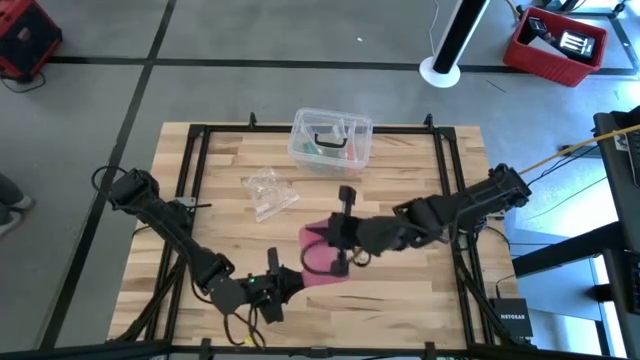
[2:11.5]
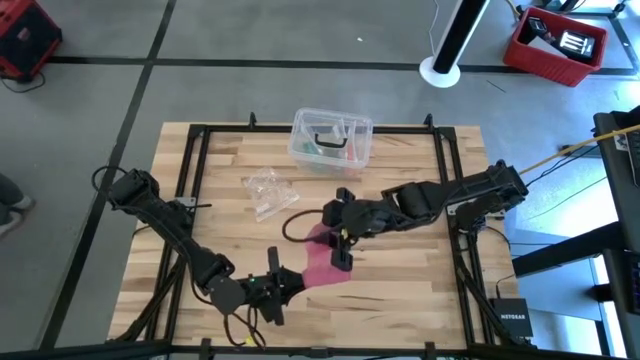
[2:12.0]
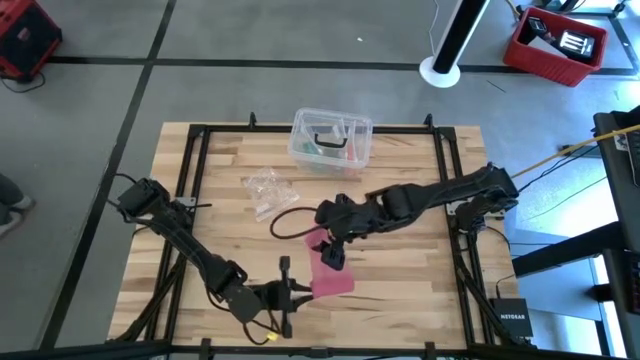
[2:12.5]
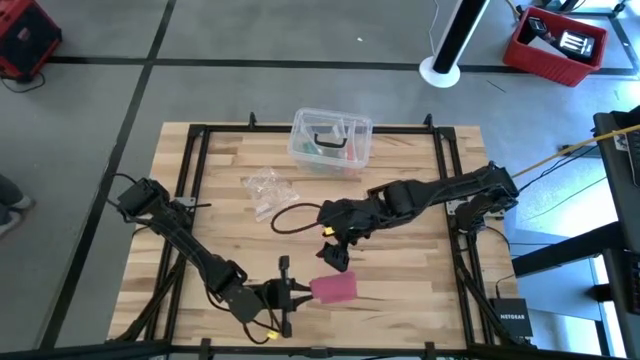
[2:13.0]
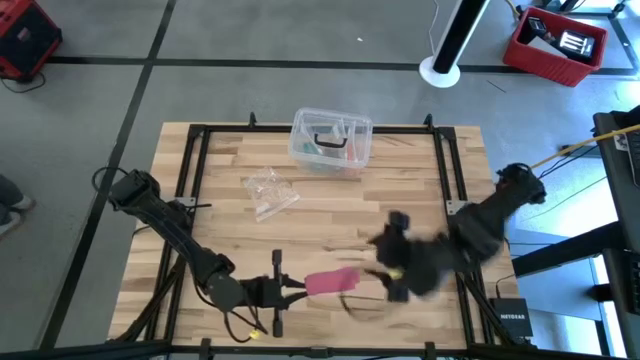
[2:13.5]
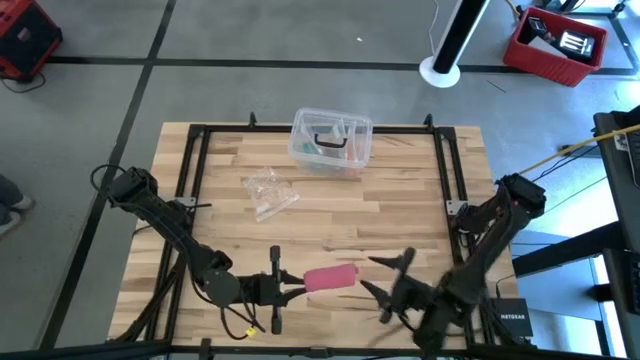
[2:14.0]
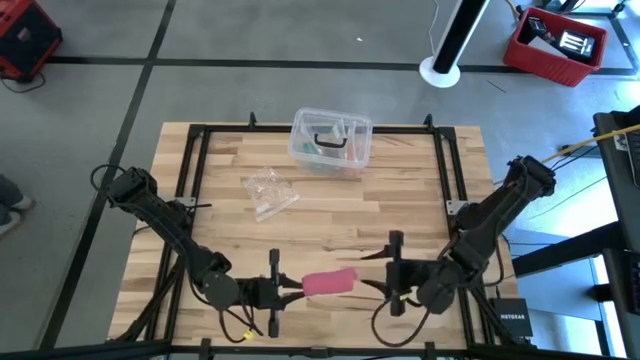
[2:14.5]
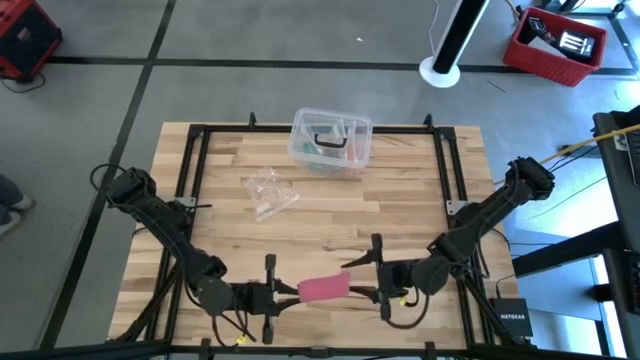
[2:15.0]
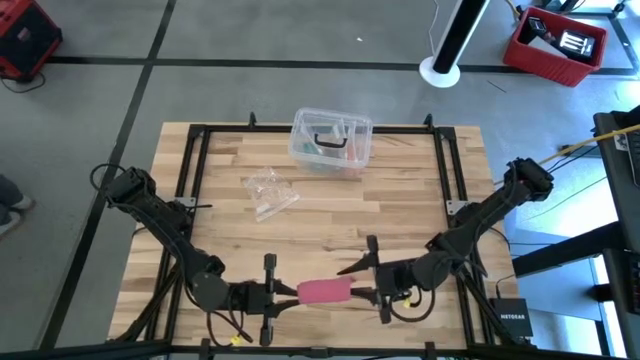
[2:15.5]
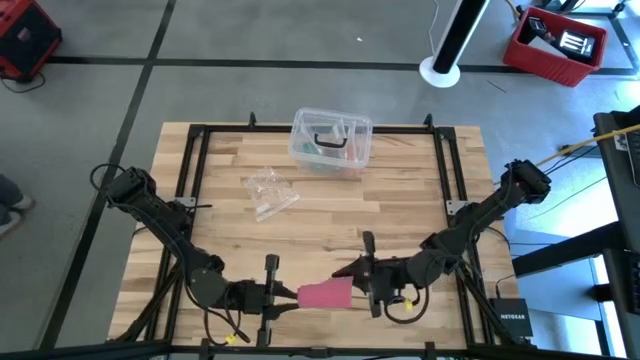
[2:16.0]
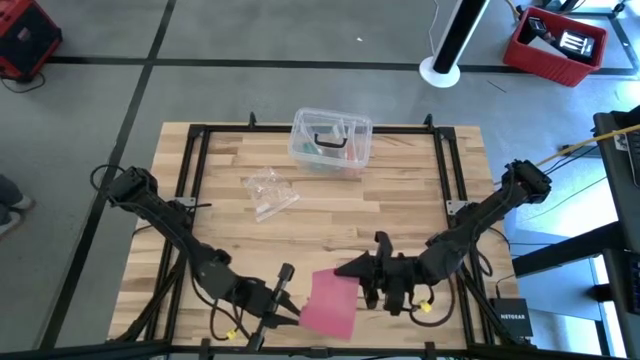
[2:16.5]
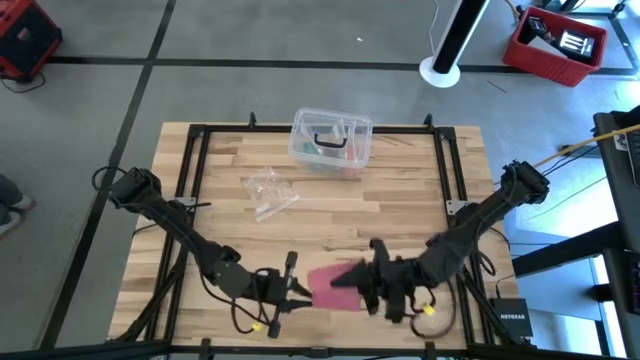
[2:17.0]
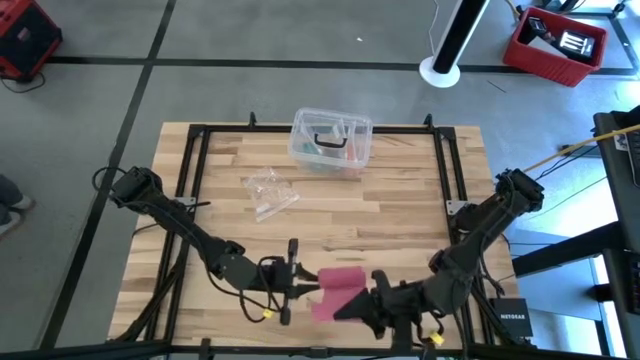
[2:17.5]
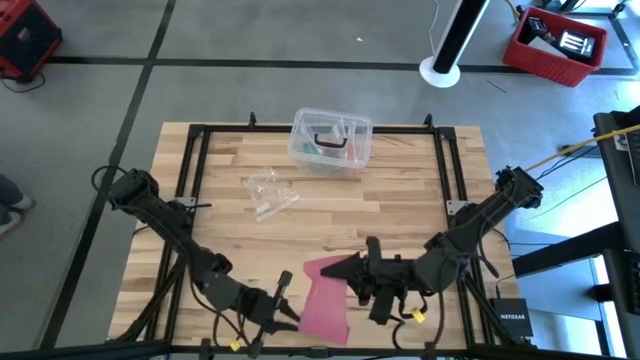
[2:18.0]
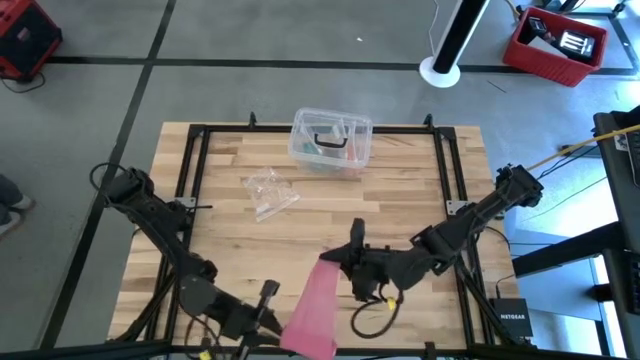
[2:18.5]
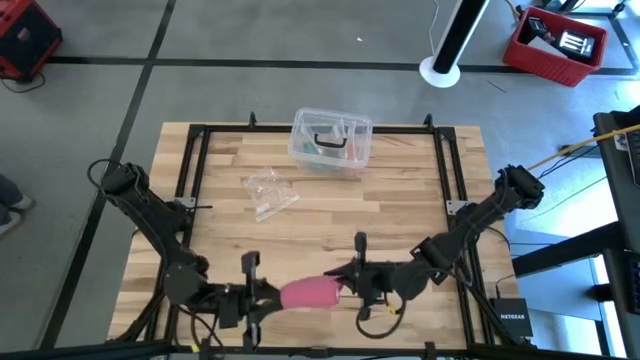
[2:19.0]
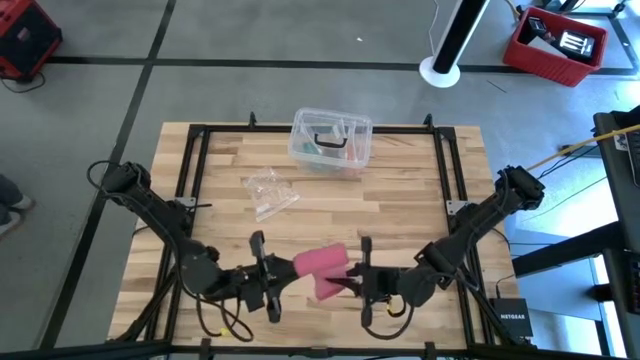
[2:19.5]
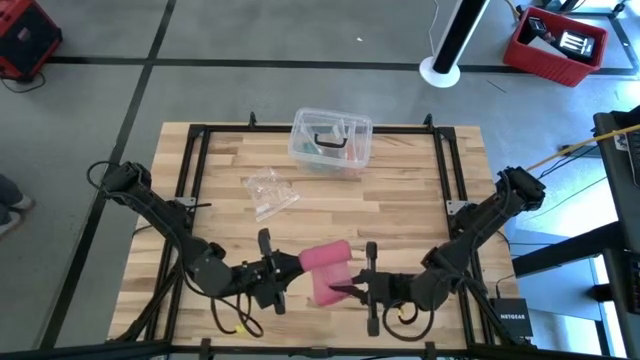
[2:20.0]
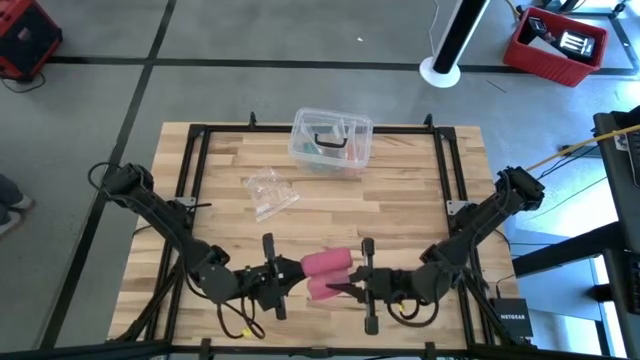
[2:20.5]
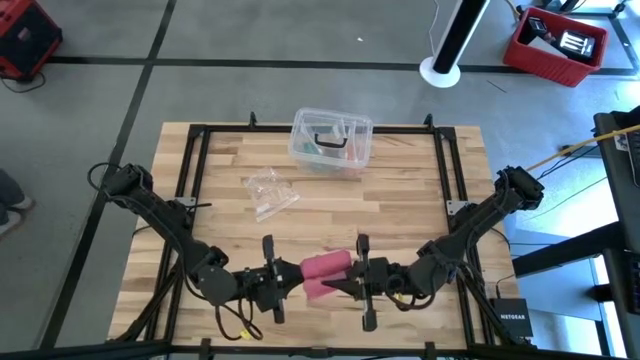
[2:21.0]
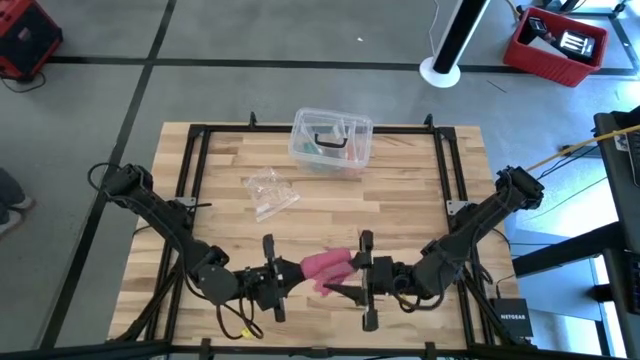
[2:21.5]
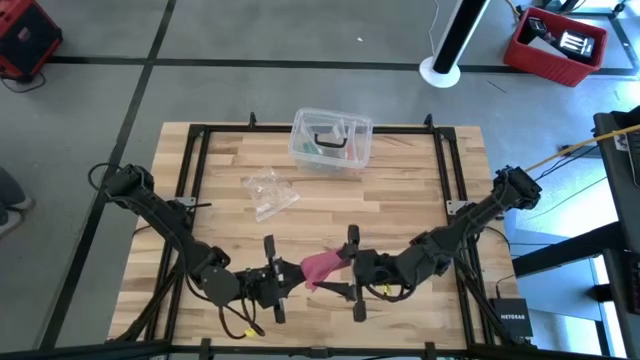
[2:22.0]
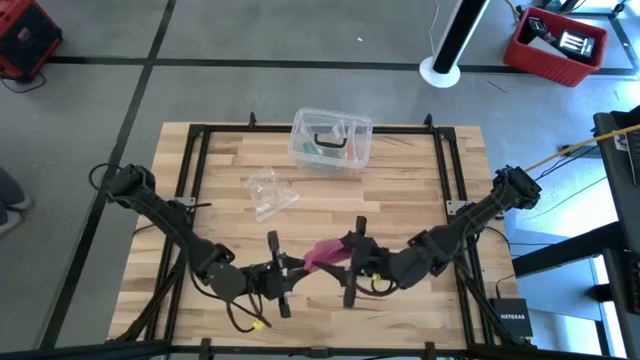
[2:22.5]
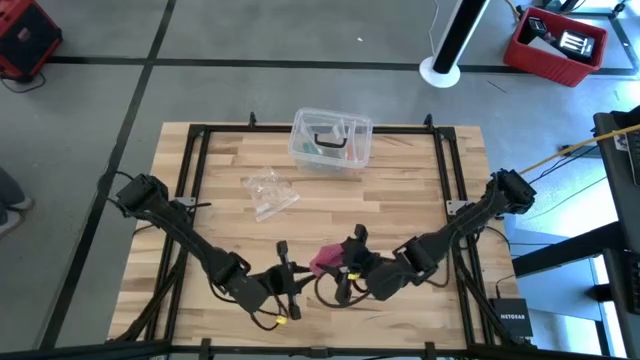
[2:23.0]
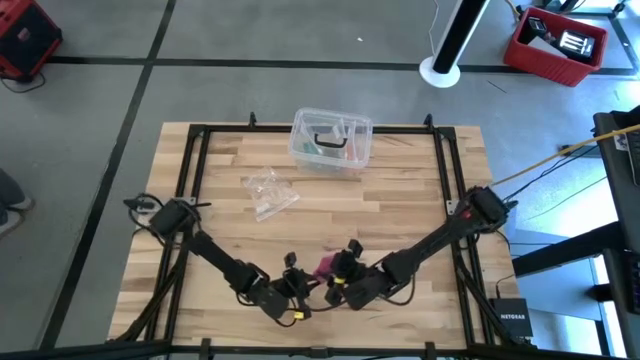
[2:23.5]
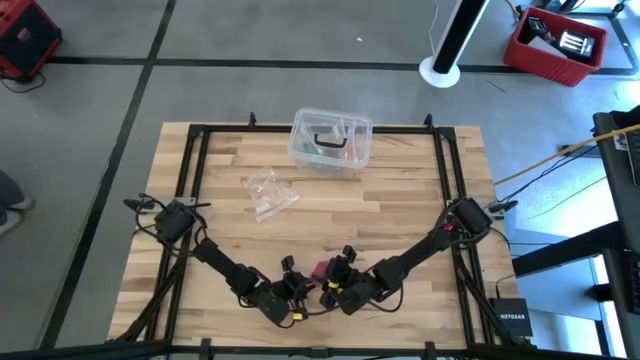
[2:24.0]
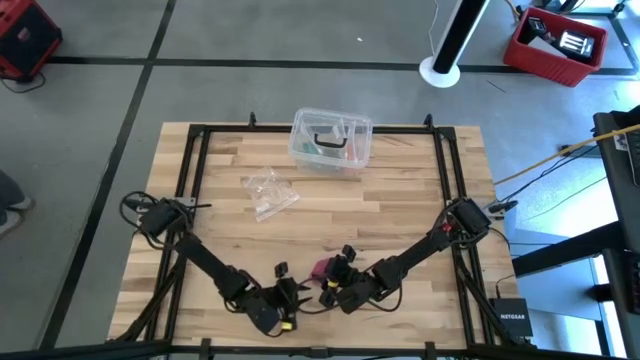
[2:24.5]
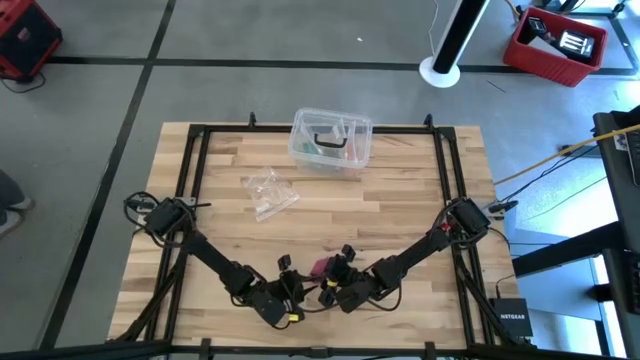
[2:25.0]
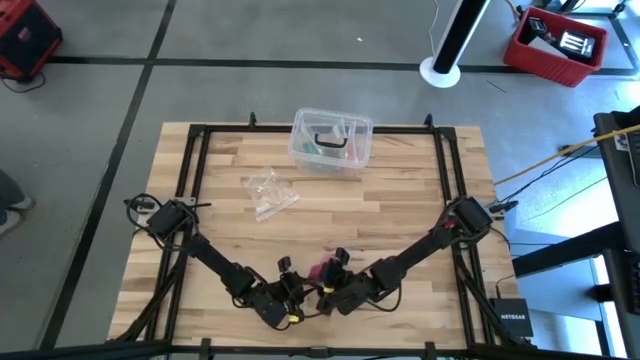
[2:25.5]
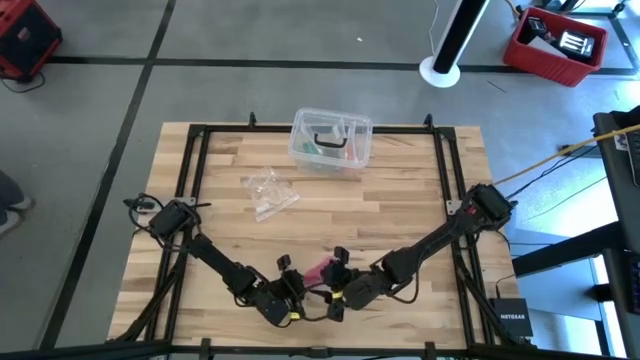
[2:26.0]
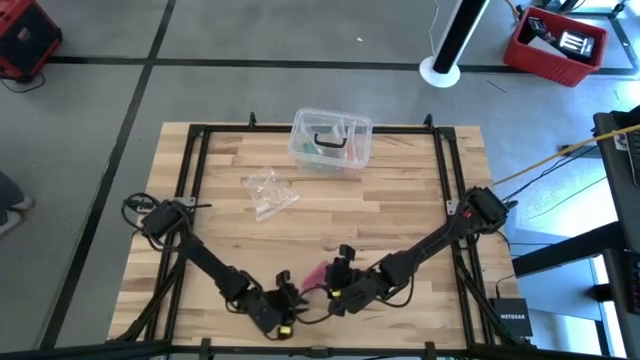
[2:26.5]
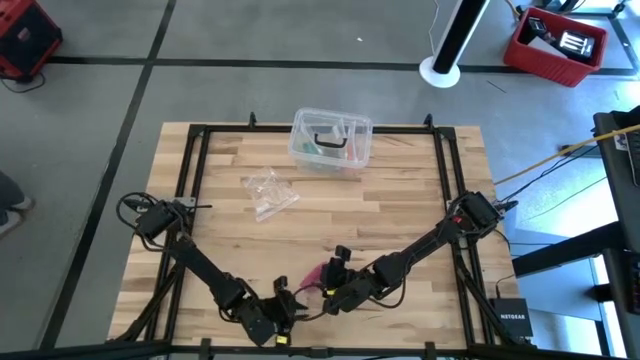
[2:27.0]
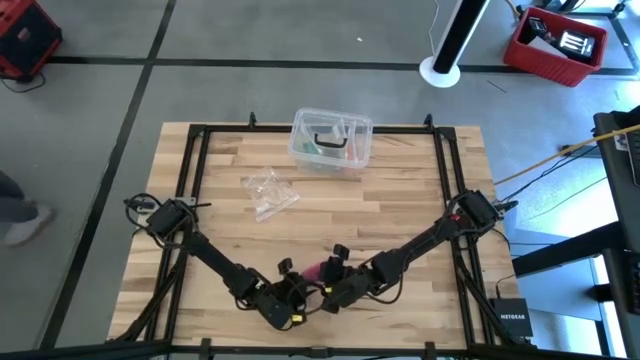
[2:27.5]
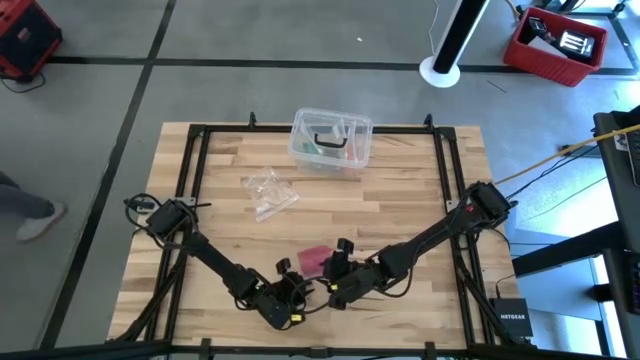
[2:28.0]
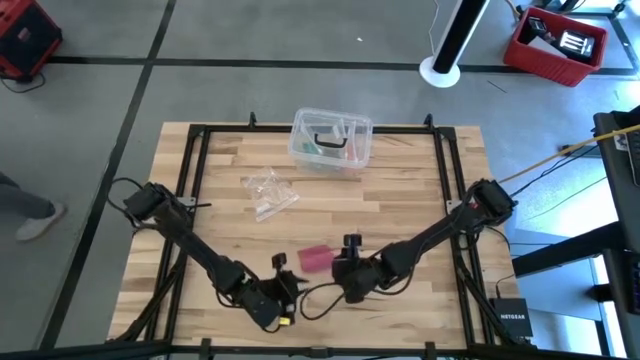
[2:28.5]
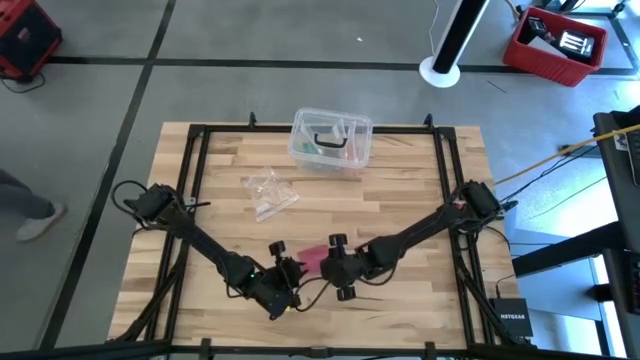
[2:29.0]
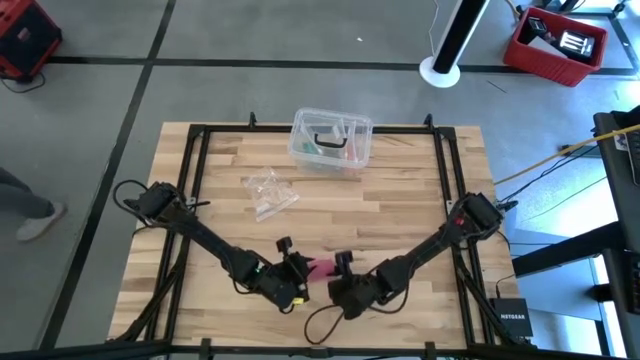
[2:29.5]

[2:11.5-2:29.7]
Task: Roll bandage
Roll the pink bandage

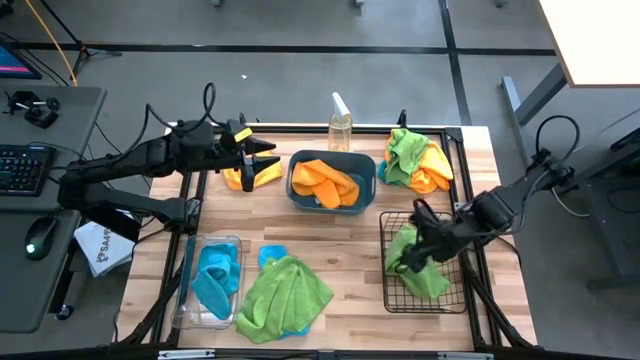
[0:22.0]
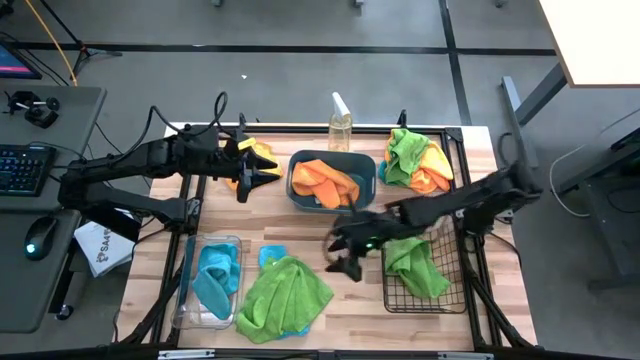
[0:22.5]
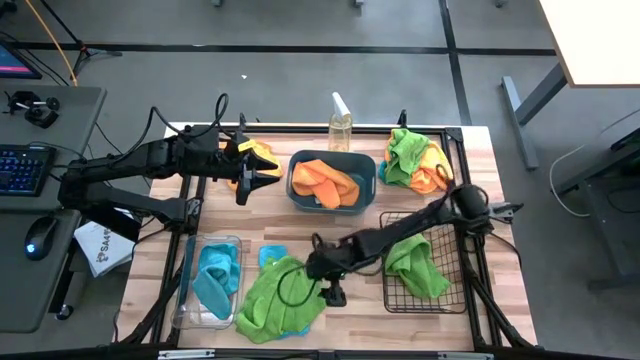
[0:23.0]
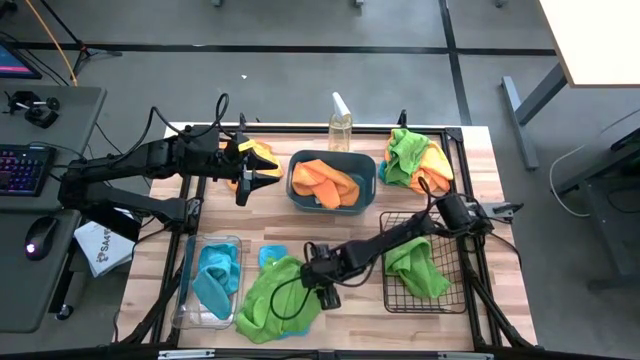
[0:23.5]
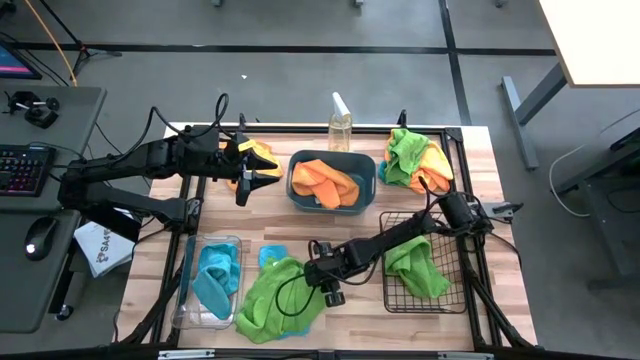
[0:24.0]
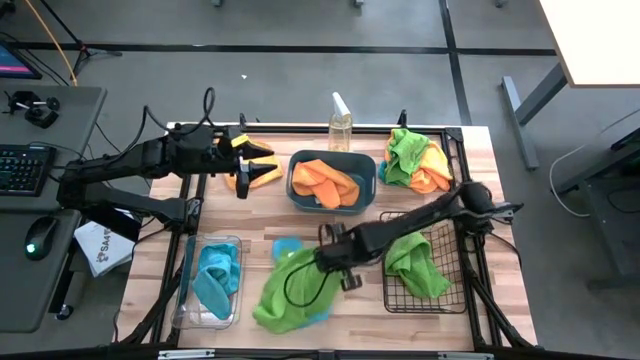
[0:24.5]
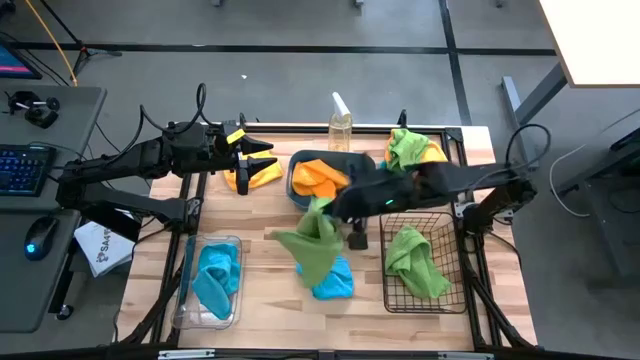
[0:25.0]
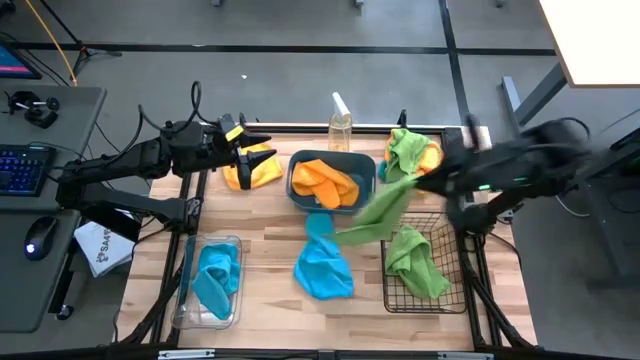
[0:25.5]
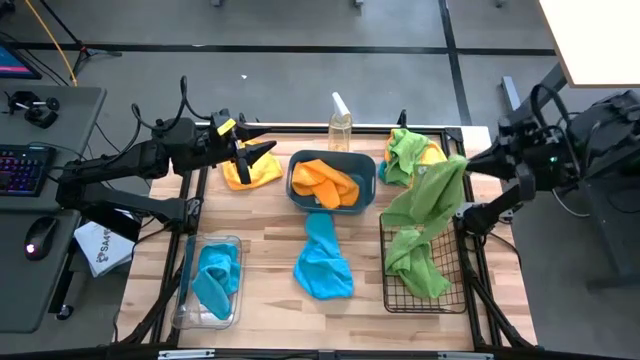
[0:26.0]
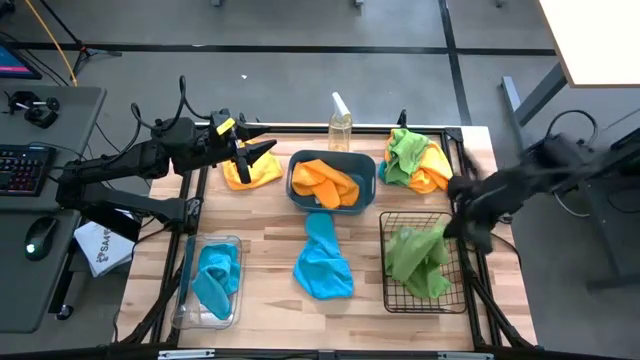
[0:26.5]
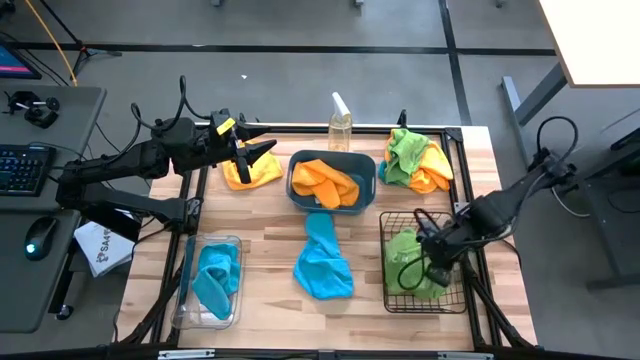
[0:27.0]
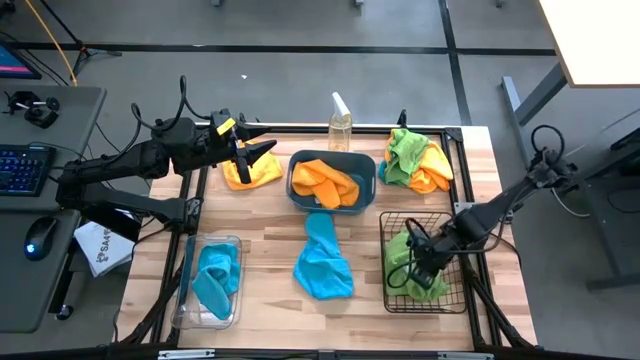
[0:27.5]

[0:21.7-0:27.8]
Task: Sort microfiber towel by color & place in baskets
Put the bottom green towel into the black wire basket
